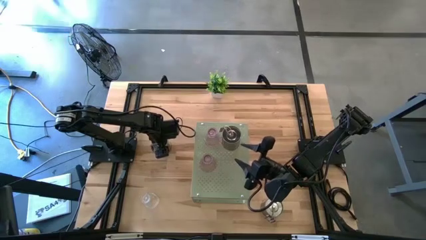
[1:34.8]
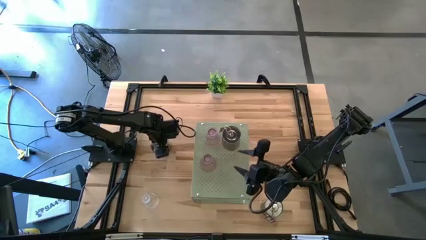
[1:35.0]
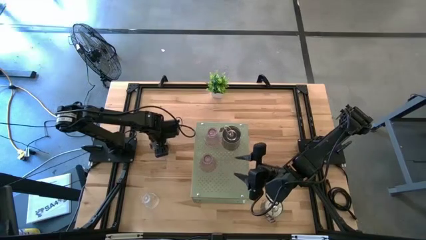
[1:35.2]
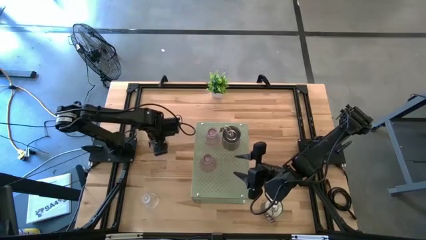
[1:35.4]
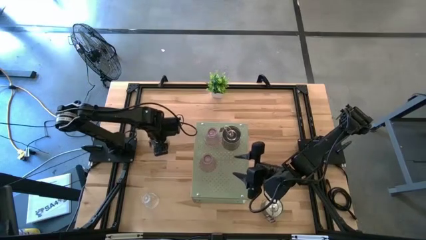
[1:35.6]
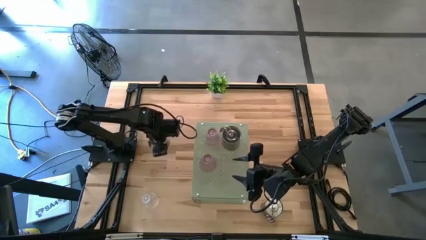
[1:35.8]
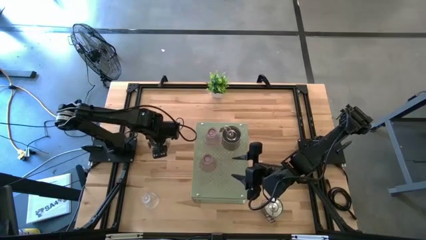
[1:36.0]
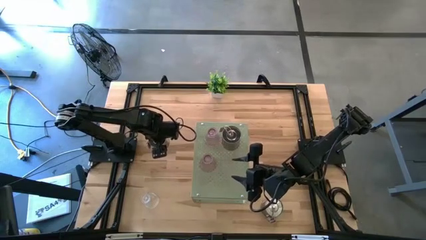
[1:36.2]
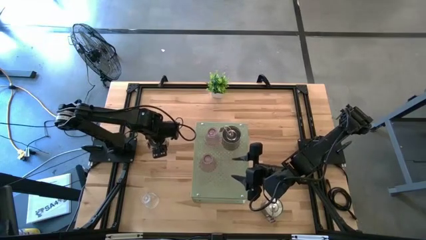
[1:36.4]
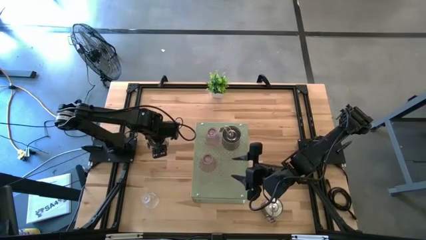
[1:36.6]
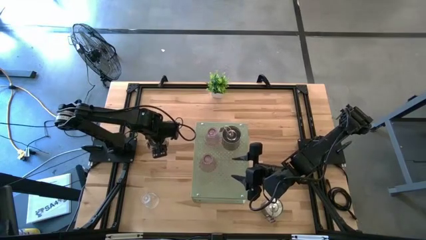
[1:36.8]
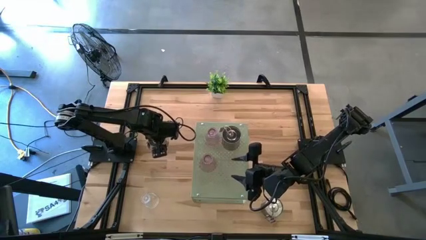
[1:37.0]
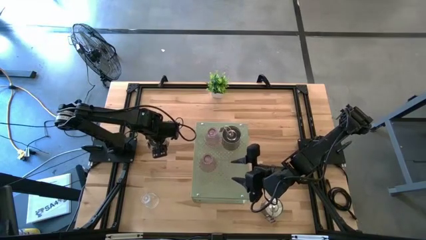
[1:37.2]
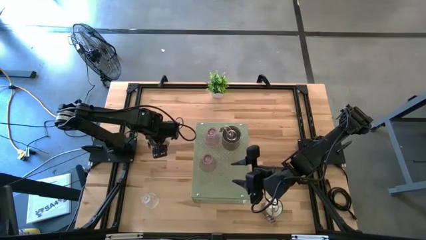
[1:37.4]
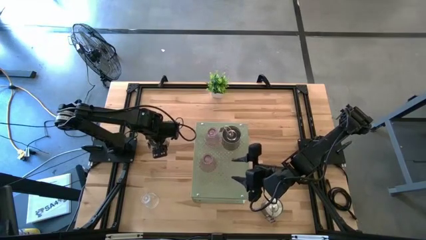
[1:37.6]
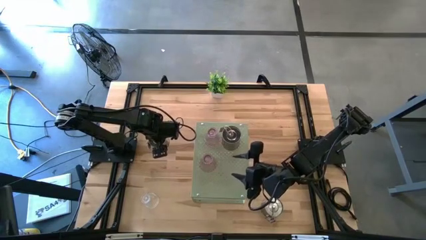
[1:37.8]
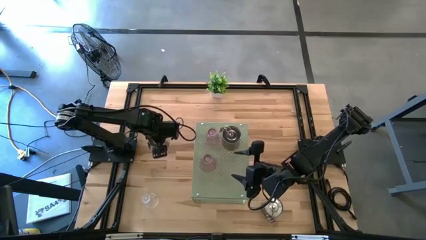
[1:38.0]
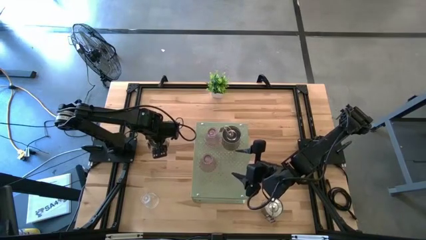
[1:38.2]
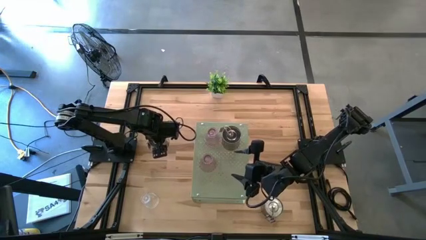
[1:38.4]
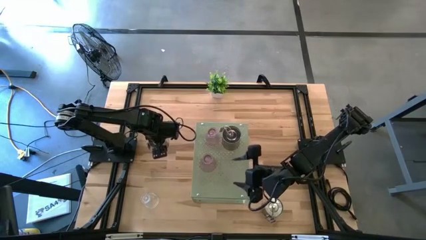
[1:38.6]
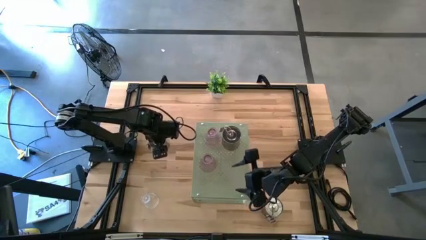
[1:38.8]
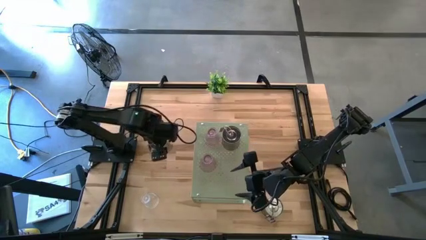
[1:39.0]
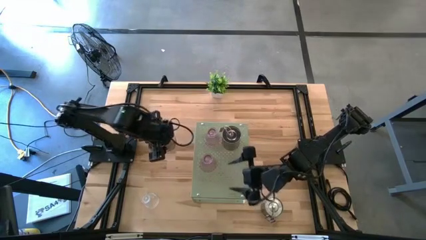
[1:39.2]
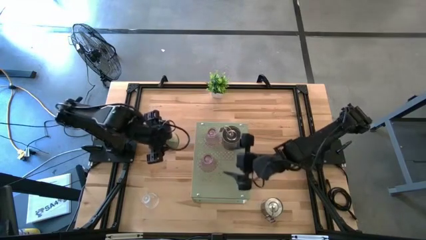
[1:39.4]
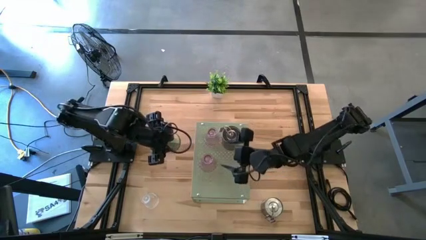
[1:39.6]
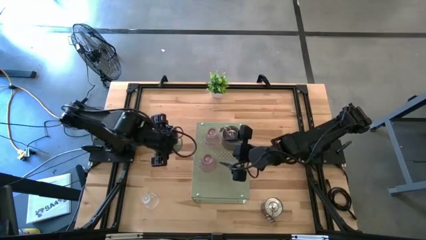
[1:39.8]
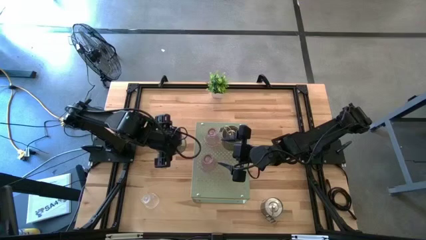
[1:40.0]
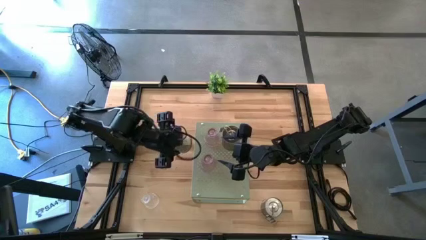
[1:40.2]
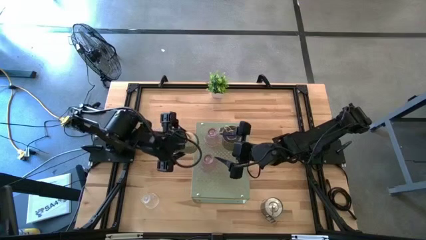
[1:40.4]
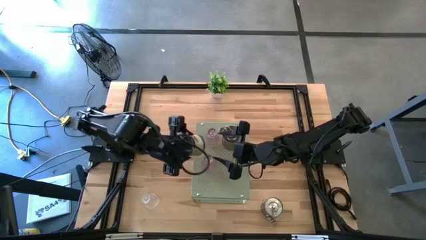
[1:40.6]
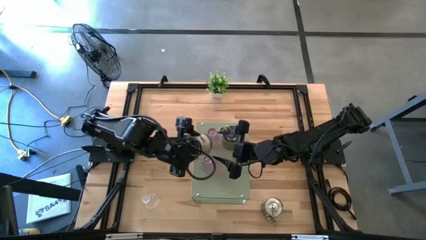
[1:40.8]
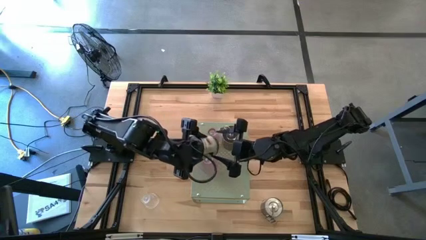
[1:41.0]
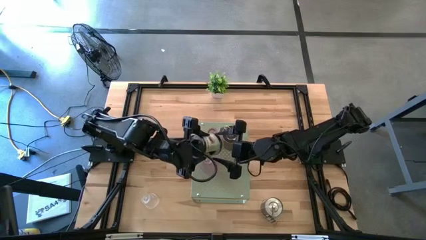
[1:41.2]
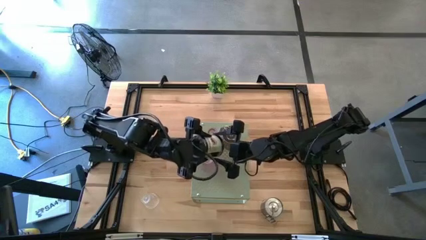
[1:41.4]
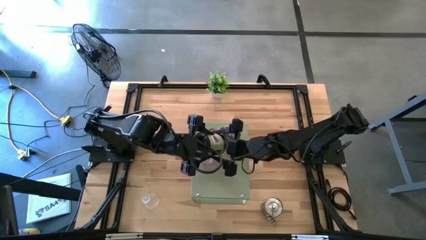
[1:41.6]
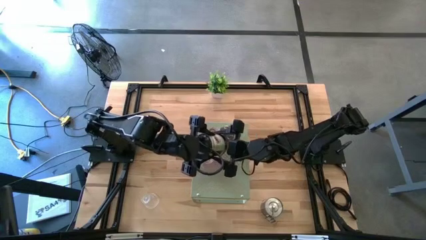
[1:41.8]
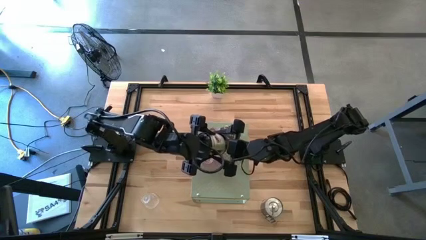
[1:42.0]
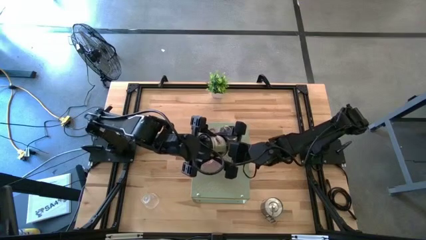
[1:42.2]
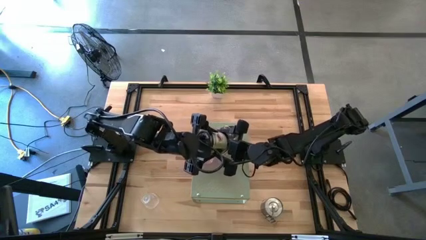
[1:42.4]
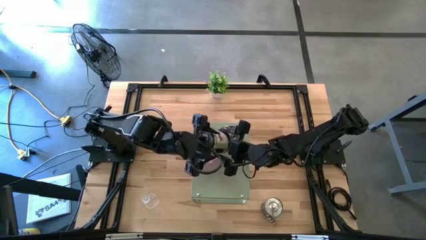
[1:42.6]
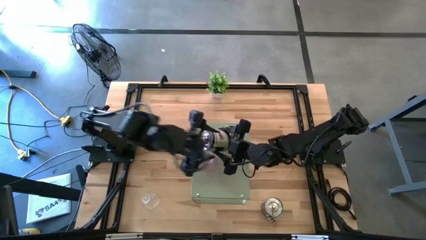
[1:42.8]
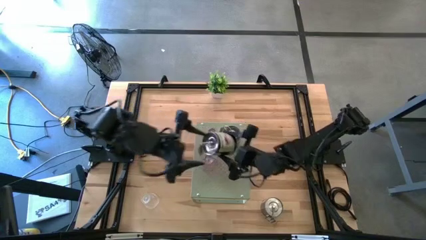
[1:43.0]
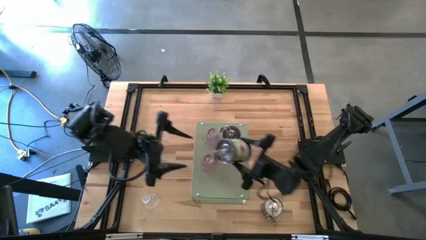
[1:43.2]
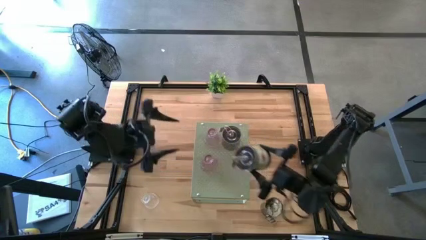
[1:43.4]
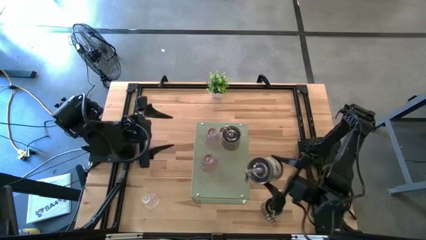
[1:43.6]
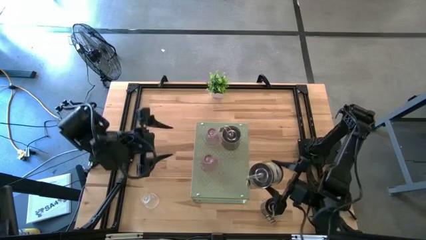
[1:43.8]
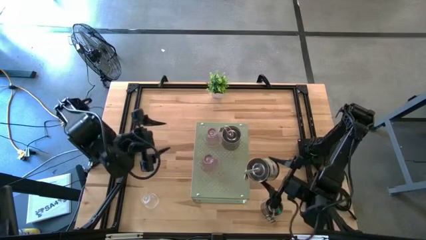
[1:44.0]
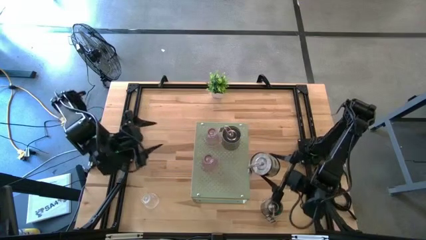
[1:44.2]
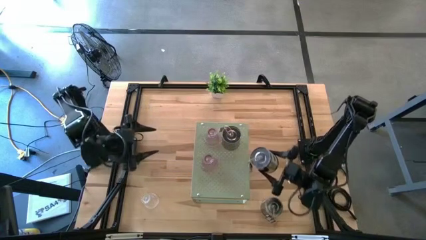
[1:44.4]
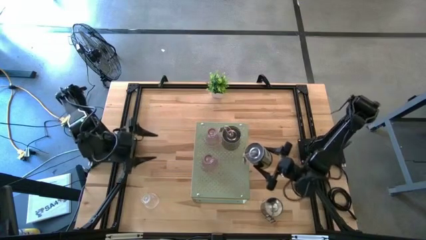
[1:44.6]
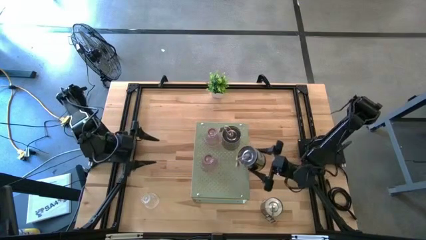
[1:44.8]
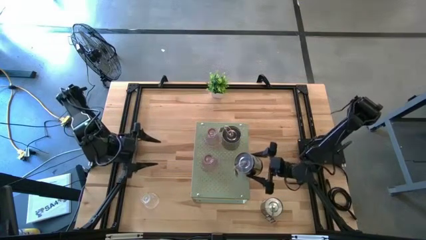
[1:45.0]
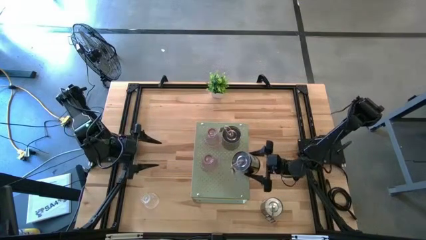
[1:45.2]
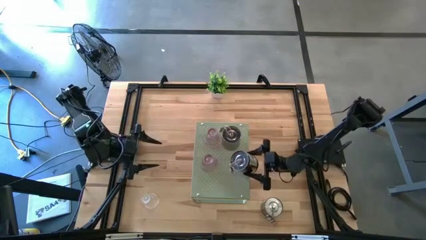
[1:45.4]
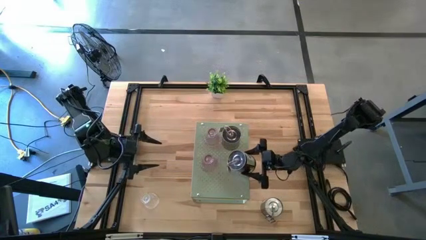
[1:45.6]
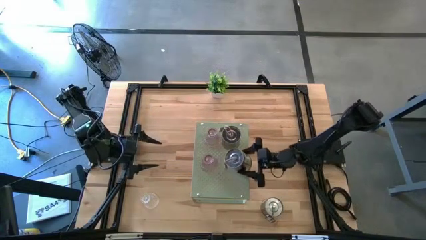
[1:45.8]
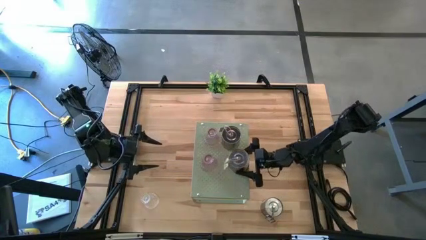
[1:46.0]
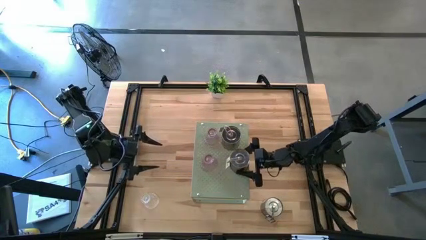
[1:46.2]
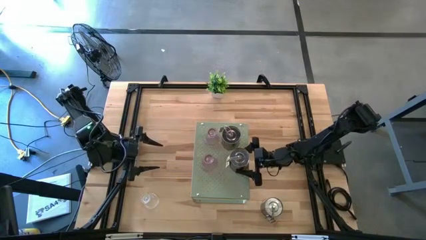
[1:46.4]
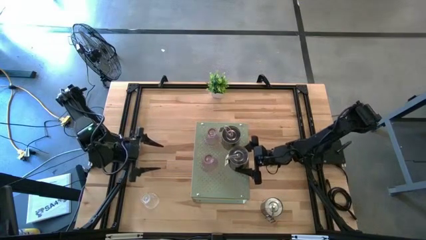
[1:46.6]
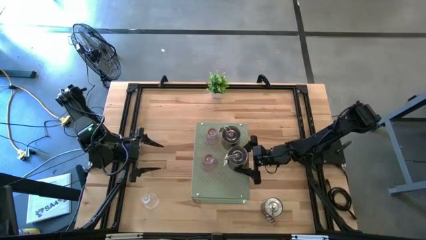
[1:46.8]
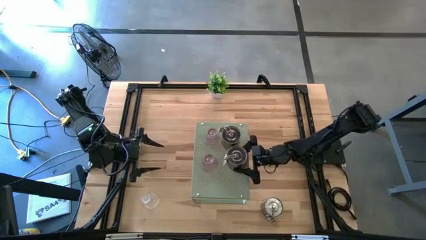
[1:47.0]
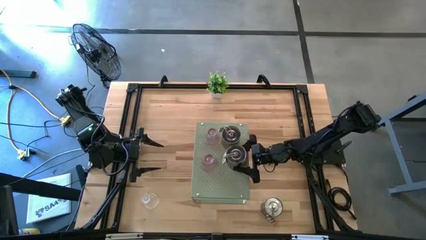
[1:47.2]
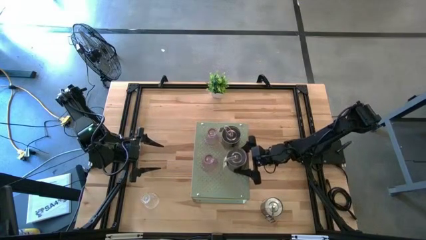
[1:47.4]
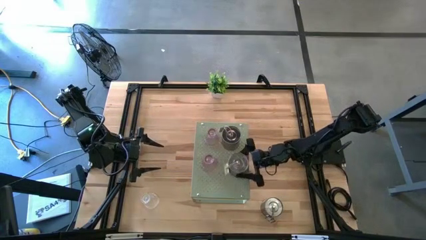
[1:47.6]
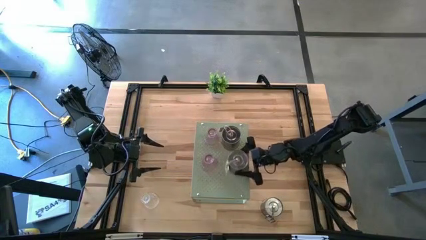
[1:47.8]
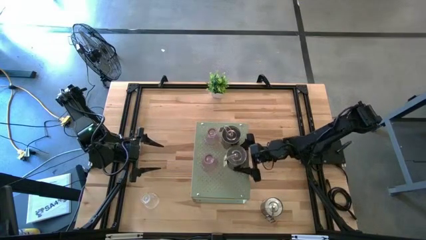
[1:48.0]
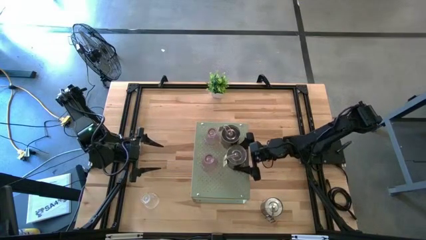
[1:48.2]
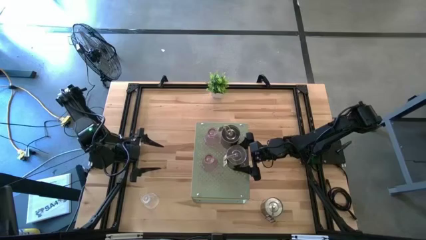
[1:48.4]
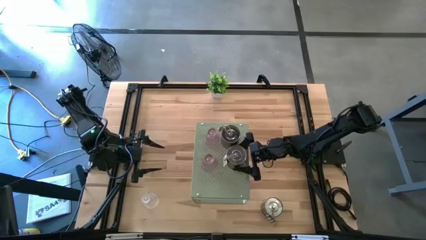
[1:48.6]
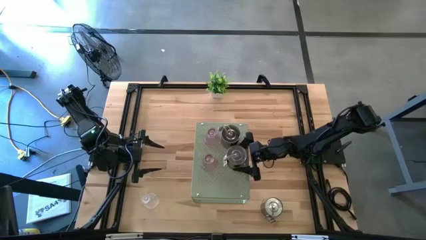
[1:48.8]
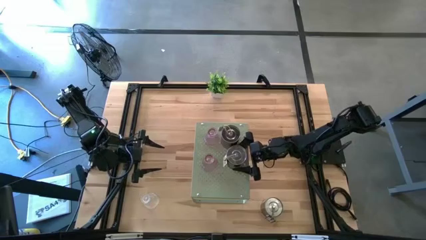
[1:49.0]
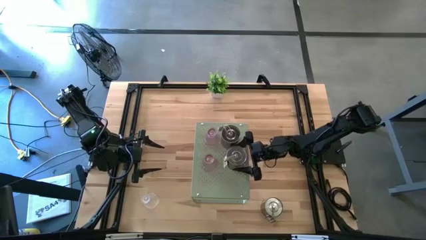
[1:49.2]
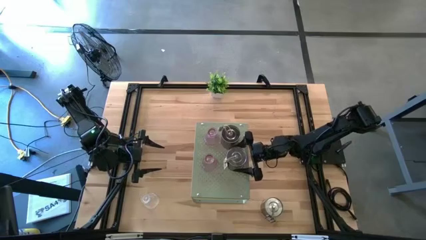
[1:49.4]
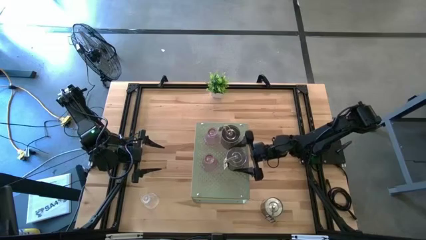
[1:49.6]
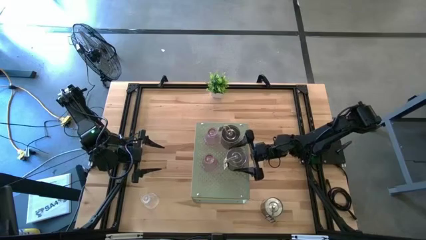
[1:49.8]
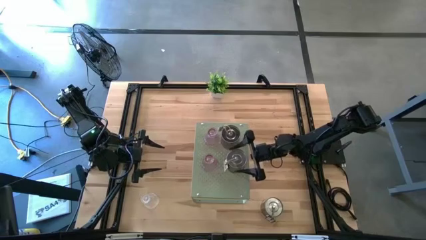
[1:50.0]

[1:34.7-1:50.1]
Task: Pick & Place candle stick holders
Put the top silver scented candle on the shelf

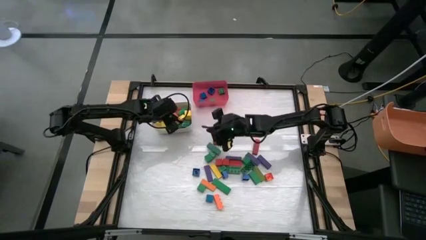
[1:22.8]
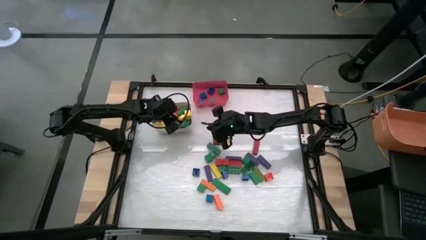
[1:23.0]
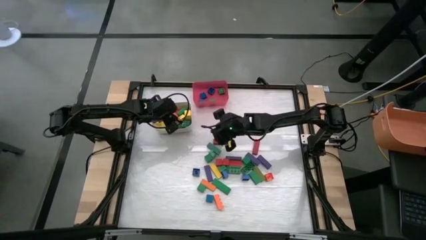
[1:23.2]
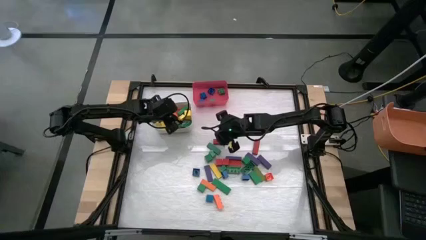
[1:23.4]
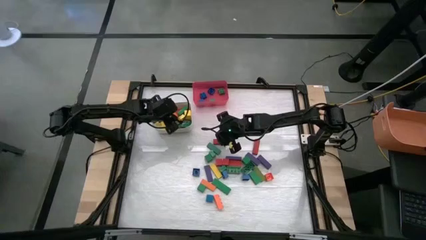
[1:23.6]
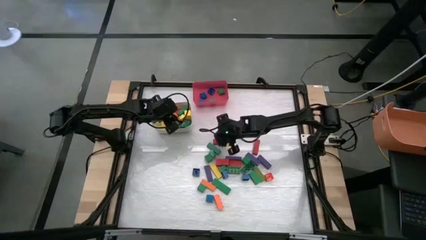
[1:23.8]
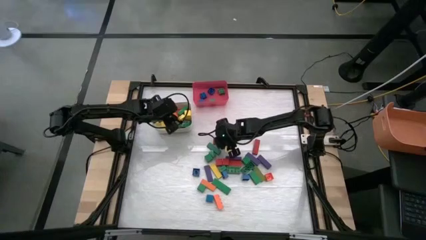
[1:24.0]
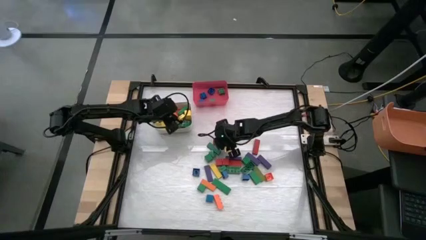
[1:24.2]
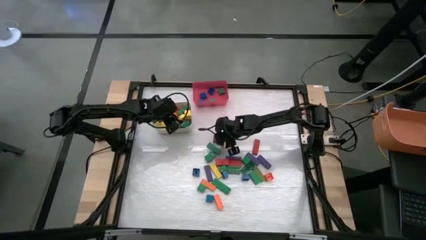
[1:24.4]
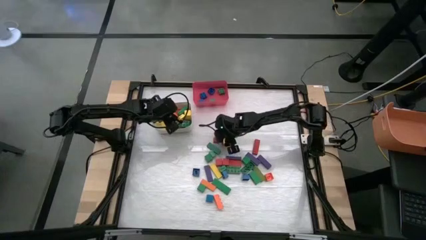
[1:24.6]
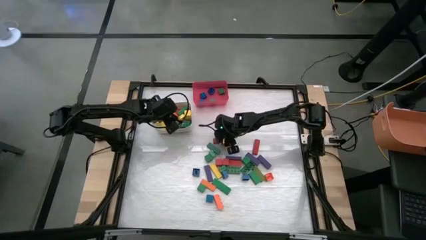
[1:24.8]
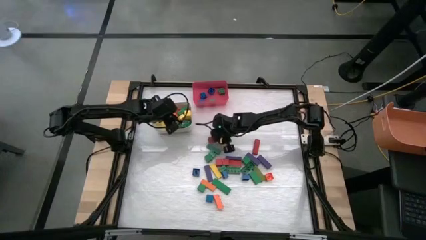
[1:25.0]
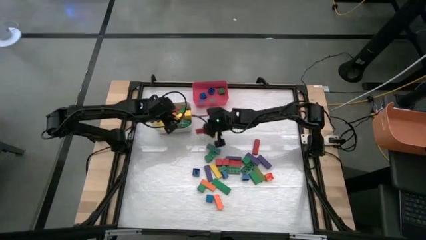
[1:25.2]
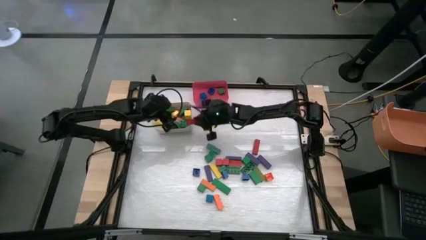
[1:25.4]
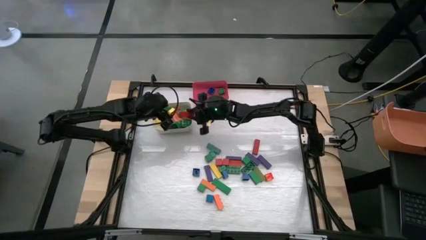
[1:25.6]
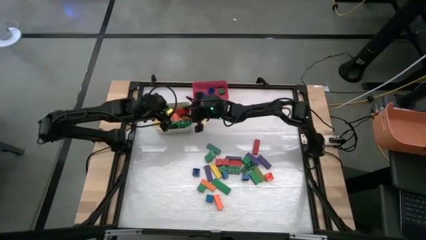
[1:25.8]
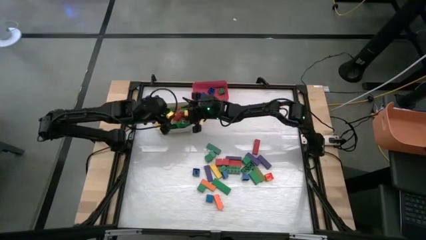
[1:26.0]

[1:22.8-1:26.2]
Task: Sort blocks by size
Put the large red wooden block into the white bin
